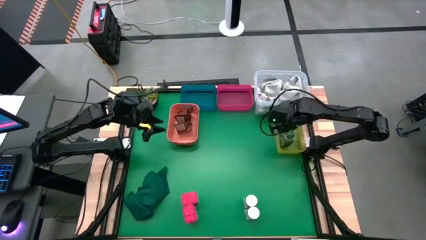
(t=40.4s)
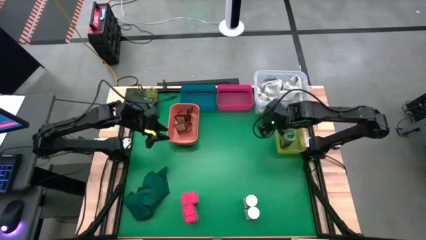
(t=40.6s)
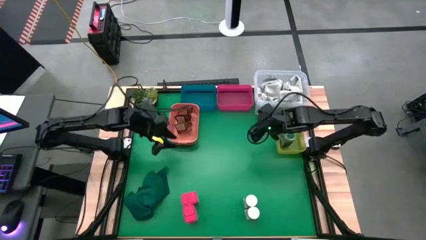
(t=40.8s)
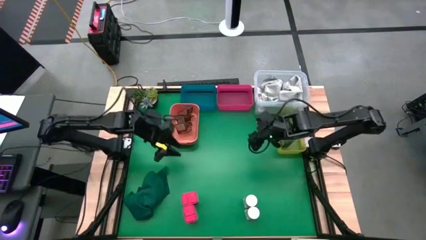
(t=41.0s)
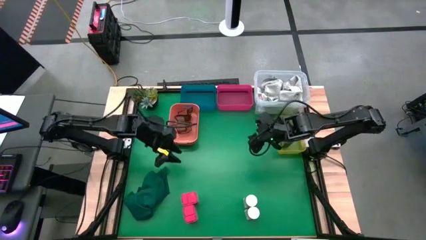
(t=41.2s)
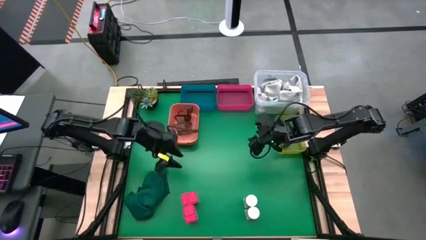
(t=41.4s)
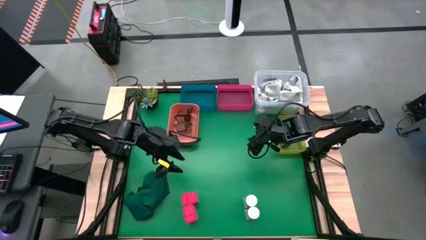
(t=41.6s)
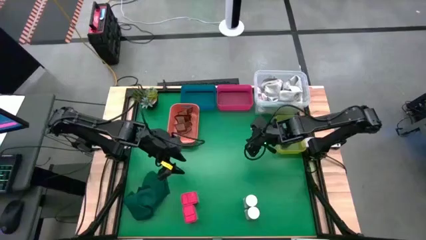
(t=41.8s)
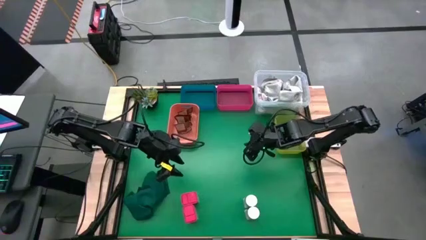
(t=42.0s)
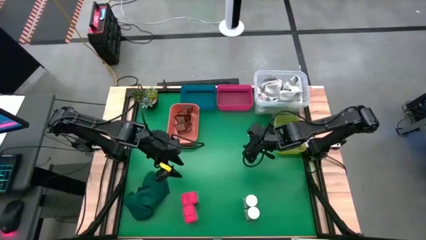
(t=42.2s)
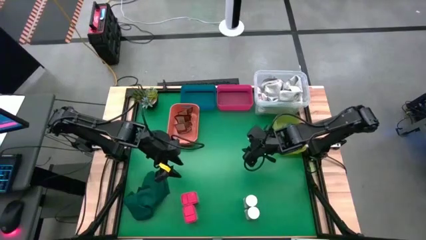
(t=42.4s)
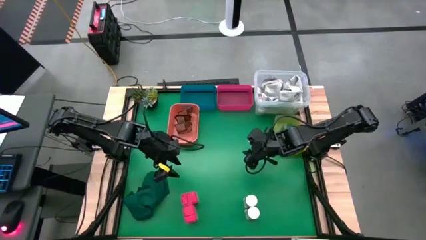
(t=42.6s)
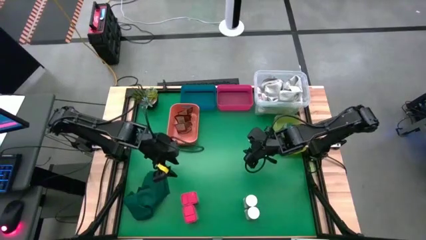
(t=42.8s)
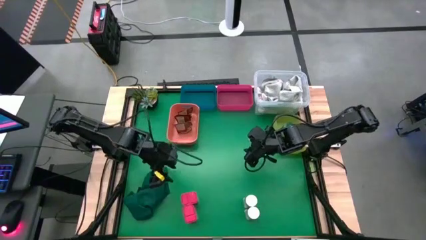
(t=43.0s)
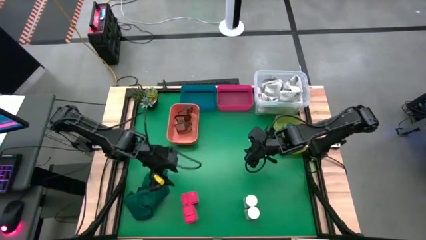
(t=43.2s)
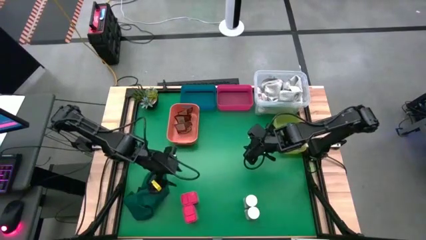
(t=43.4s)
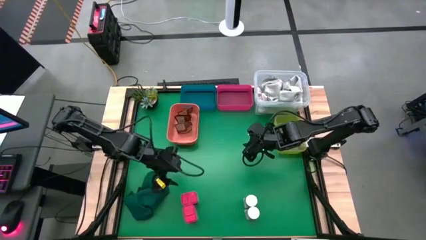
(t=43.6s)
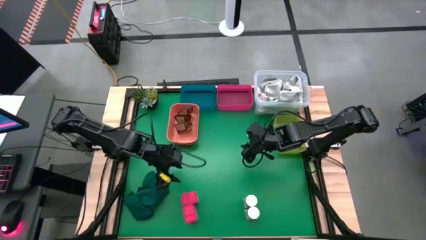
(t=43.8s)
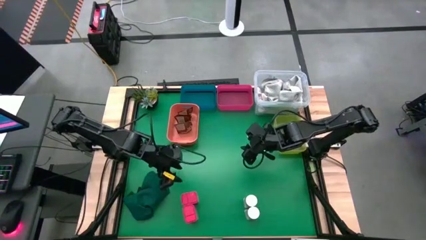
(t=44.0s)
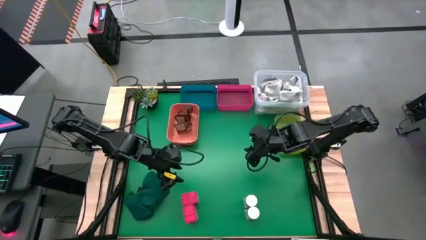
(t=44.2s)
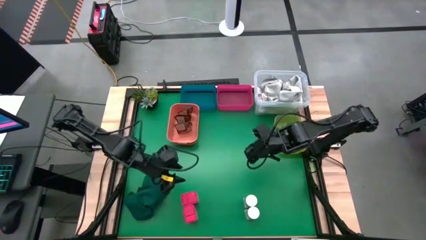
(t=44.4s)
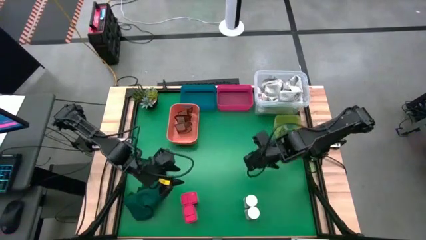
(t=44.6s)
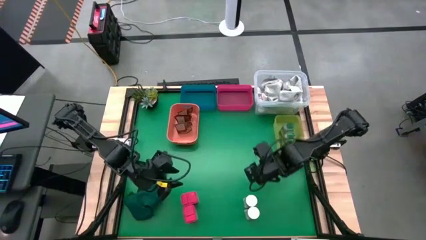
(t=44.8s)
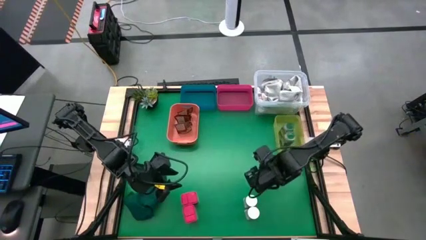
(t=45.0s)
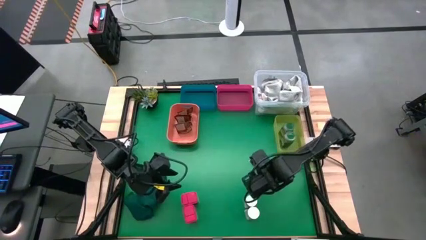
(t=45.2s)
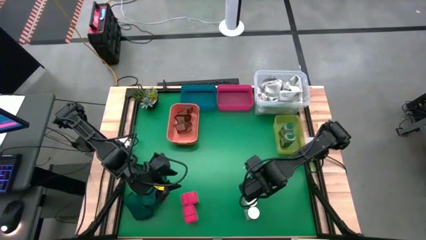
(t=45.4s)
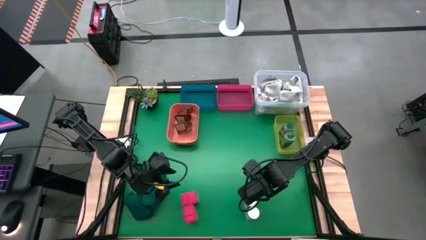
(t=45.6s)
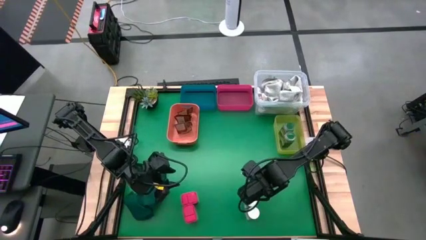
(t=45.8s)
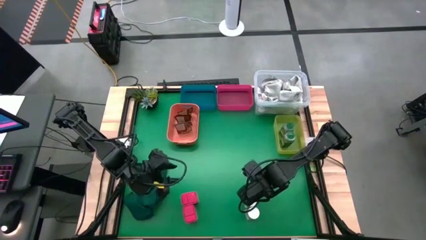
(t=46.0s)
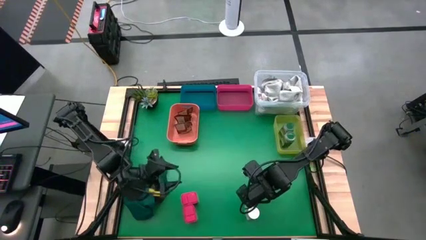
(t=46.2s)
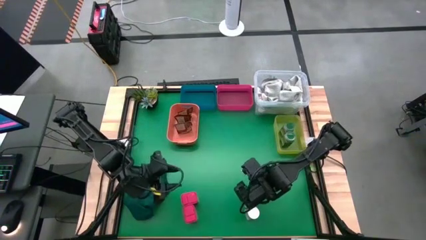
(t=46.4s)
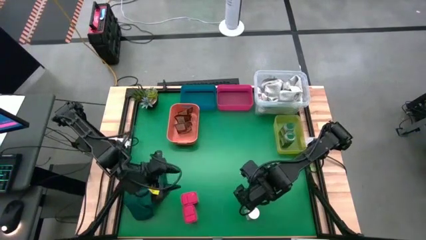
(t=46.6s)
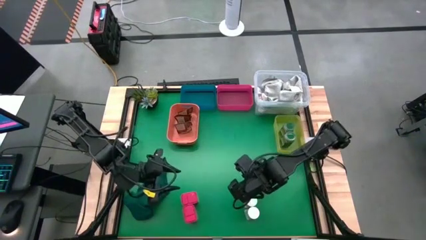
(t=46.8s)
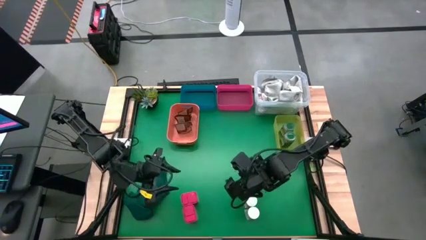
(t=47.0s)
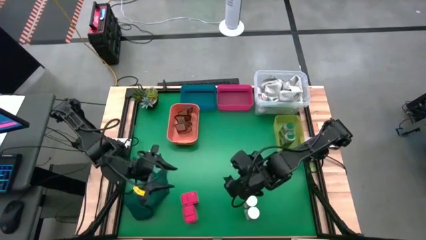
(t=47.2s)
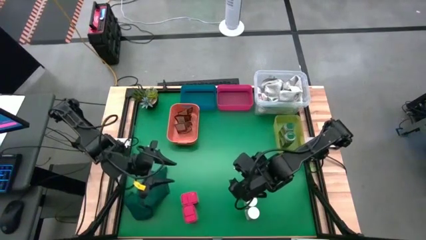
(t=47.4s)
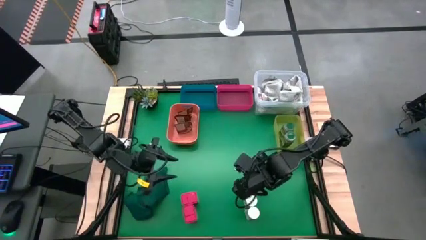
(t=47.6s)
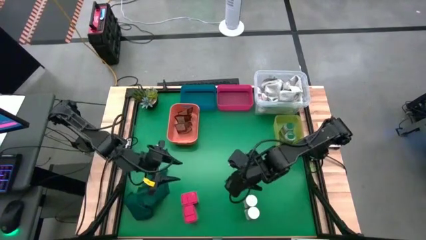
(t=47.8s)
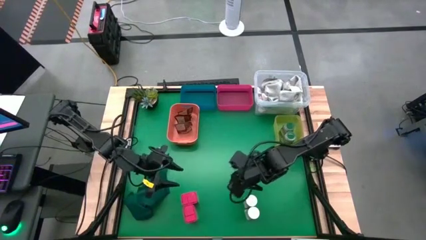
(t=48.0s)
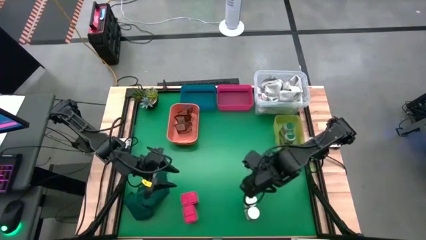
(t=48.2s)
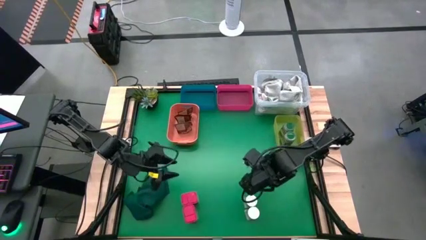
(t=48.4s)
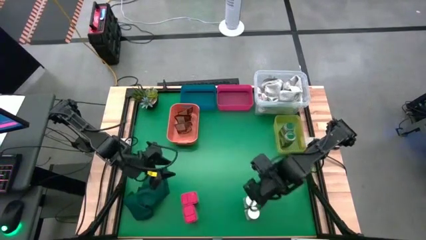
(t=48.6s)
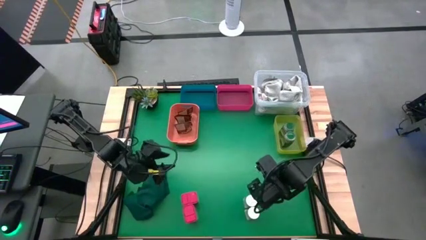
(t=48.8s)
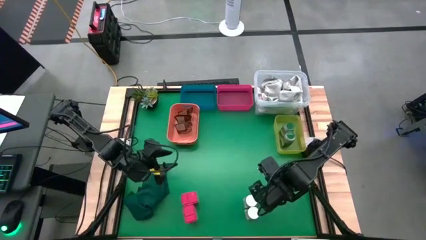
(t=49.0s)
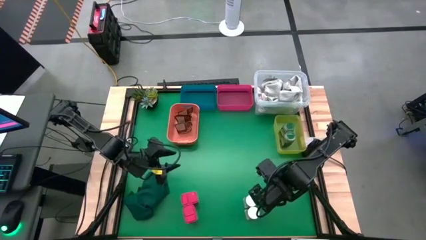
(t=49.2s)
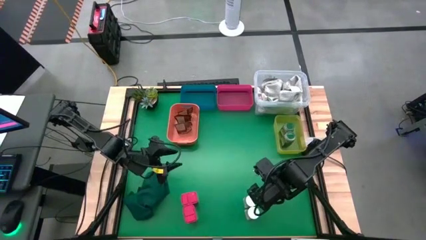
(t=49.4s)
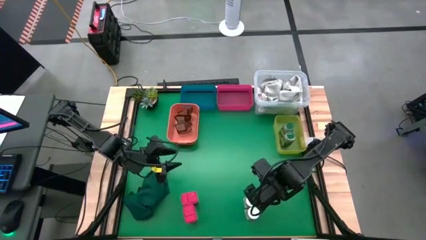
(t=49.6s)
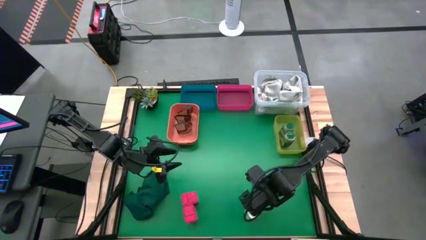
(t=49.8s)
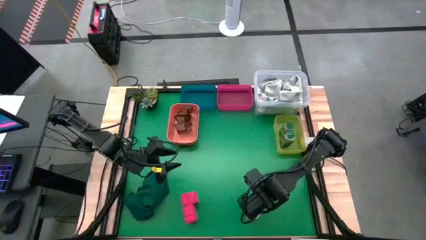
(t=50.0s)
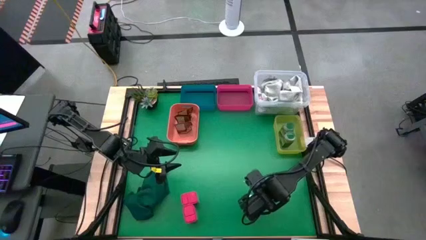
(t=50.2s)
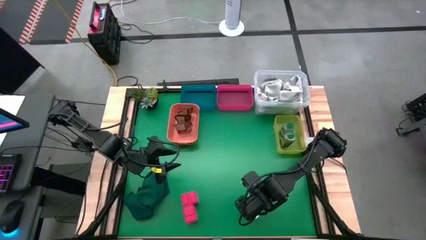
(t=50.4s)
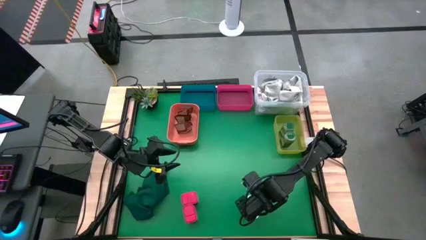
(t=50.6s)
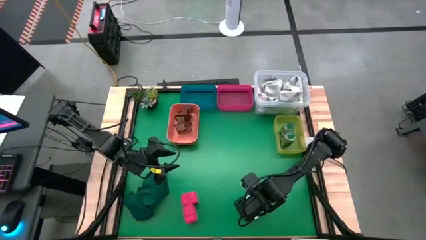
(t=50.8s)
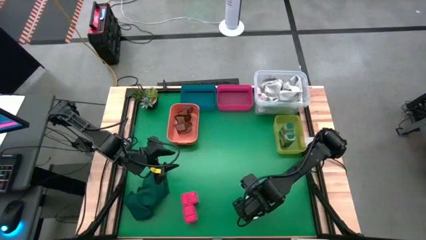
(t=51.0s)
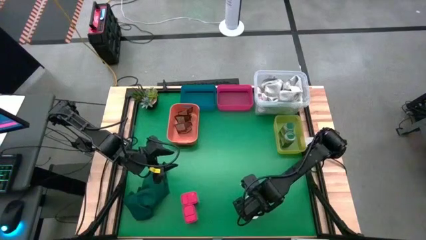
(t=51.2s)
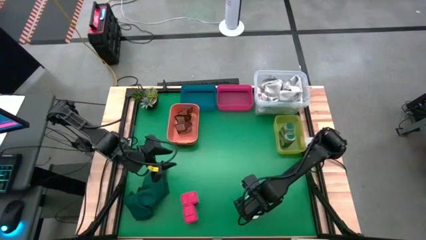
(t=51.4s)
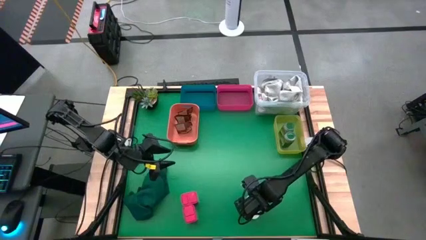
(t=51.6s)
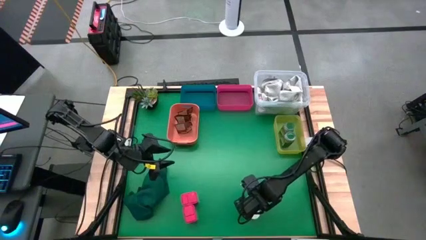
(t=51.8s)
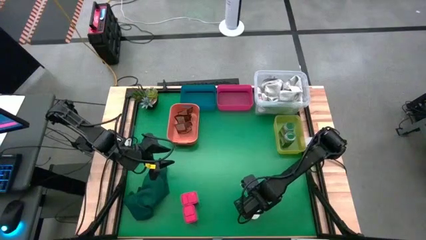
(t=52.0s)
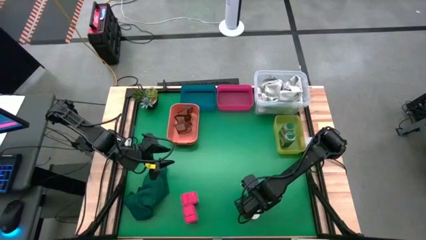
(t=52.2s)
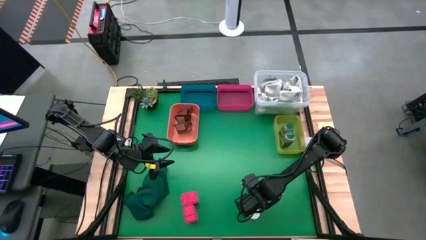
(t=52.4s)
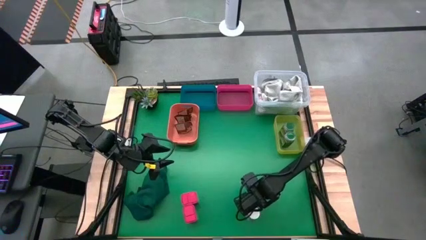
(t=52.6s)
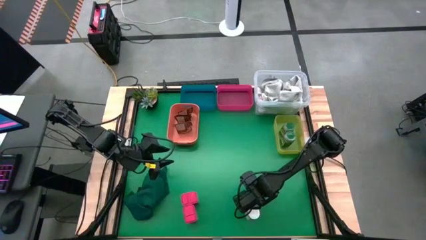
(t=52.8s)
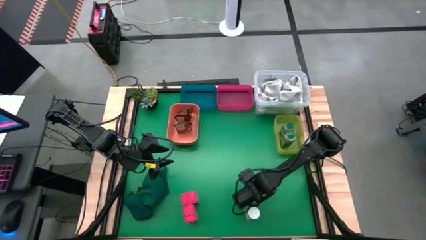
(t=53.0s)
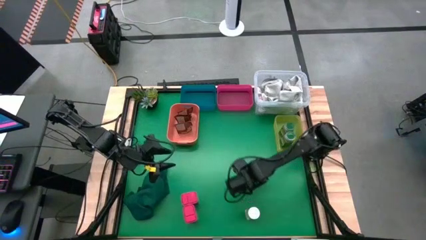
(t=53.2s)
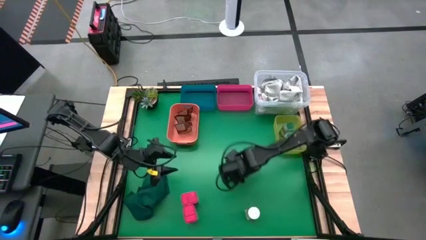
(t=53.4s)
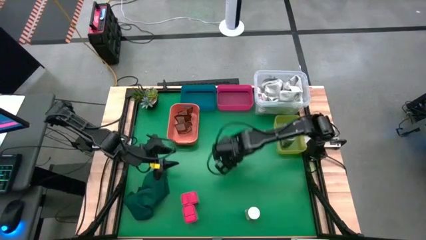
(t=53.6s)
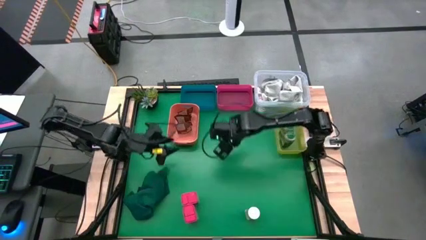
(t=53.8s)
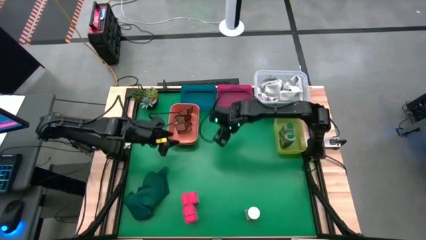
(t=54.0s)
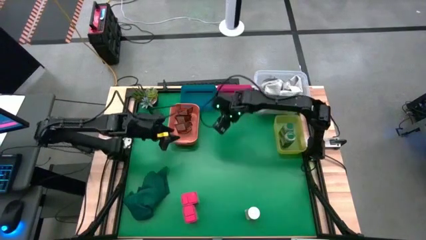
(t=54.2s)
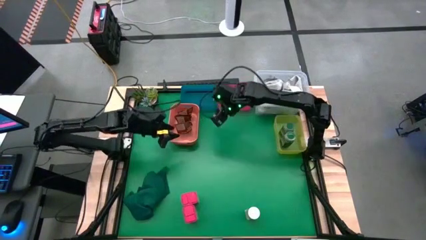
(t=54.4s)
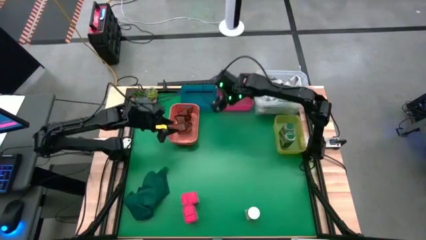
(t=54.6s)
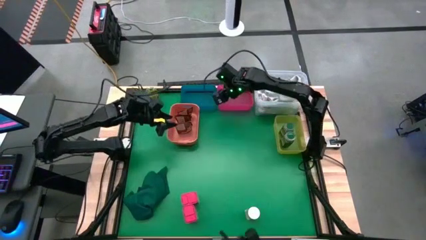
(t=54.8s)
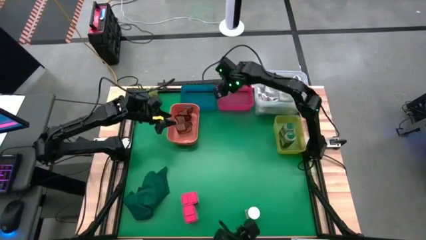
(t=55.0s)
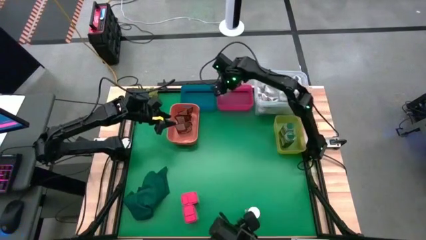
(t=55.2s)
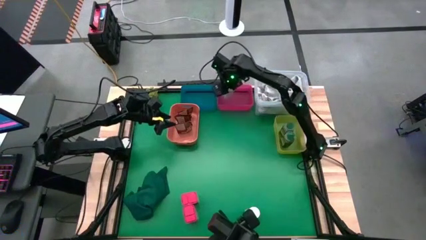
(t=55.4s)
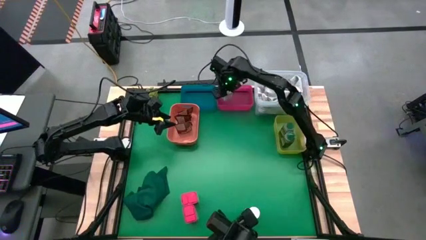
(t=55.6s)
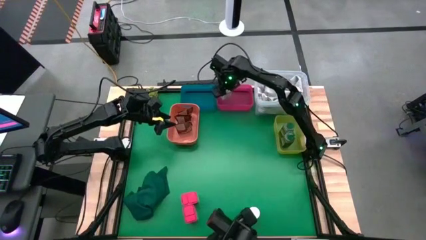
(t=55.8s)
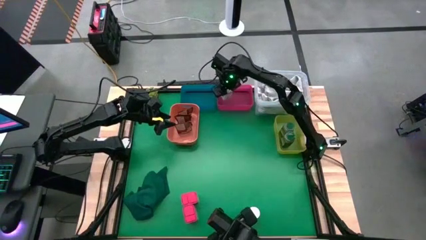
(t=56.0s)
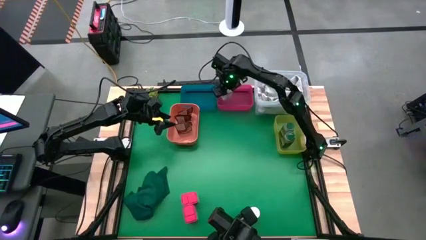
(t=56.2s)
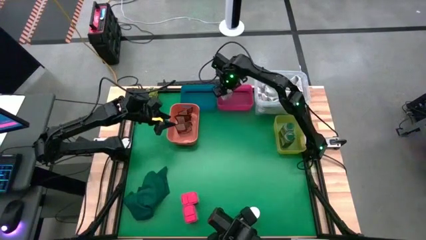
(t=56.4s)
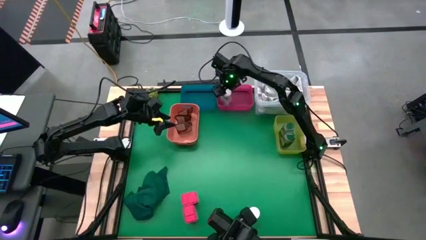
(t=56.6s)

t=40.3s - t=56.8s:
Task: Sort spices by type
Put the top white spice bottle into the red bin
